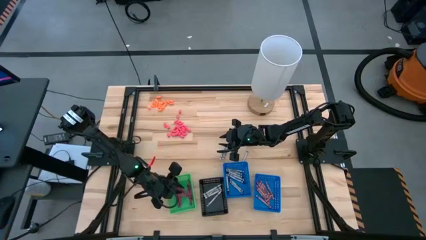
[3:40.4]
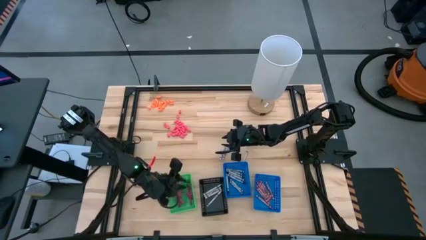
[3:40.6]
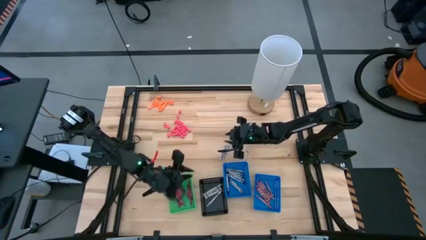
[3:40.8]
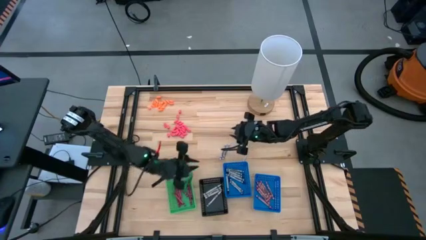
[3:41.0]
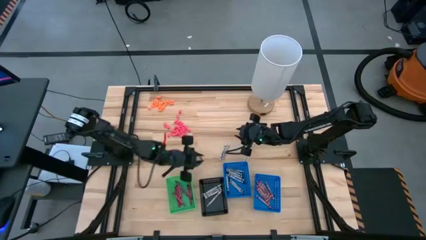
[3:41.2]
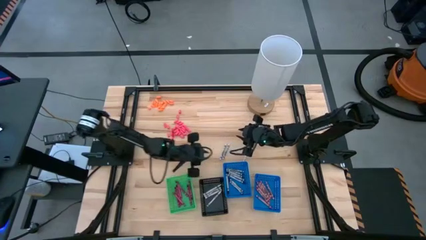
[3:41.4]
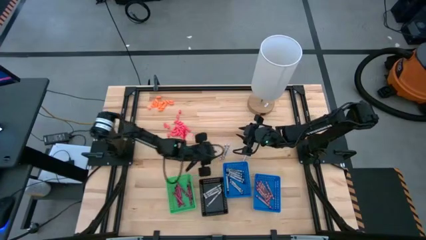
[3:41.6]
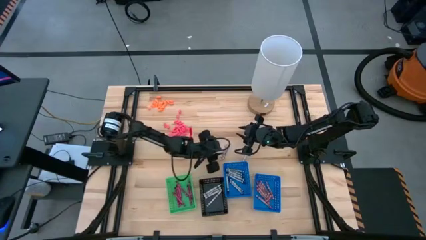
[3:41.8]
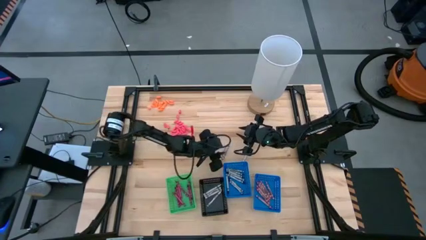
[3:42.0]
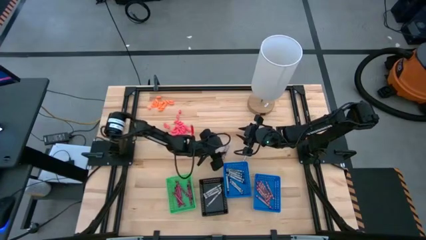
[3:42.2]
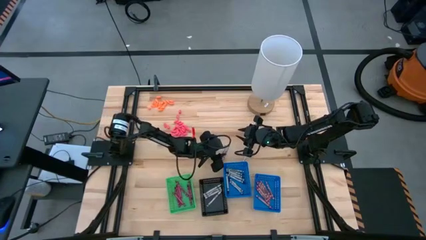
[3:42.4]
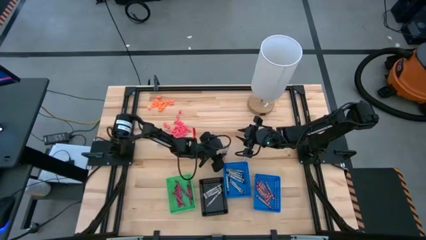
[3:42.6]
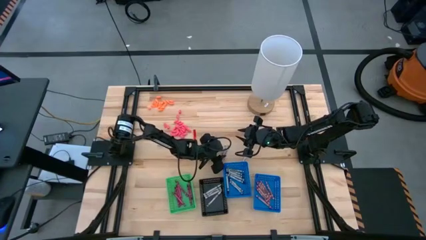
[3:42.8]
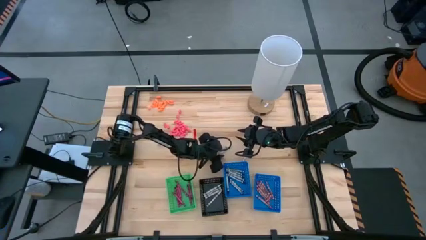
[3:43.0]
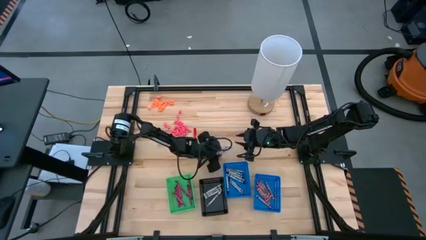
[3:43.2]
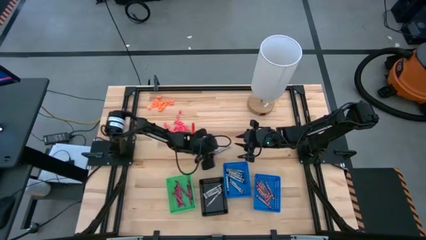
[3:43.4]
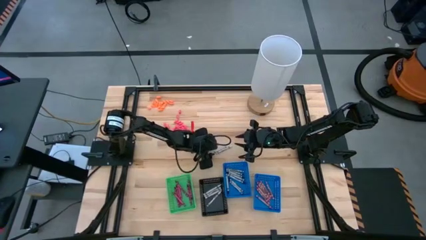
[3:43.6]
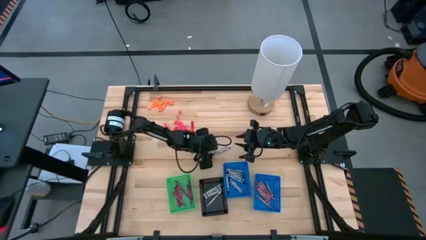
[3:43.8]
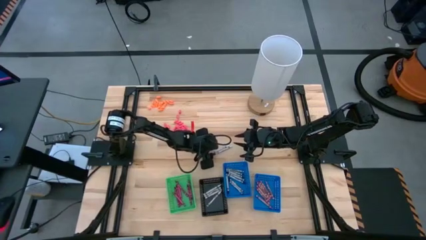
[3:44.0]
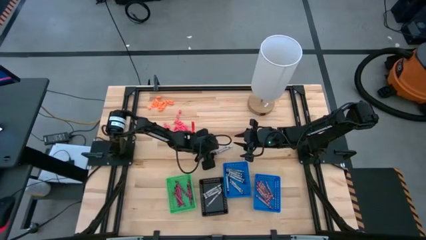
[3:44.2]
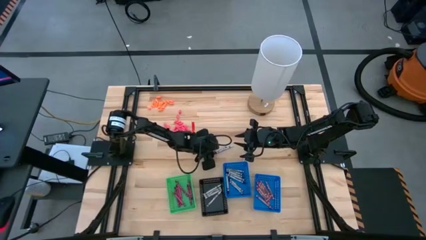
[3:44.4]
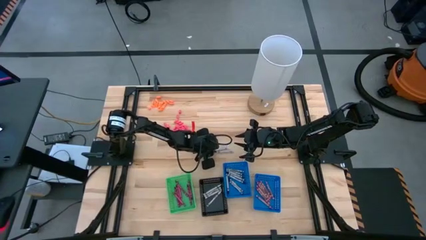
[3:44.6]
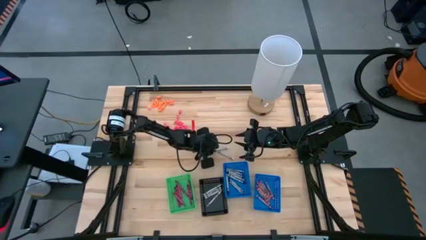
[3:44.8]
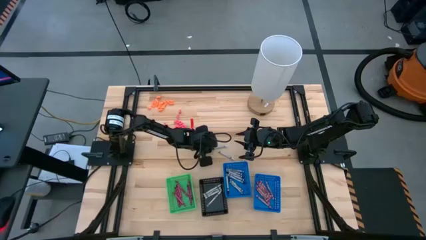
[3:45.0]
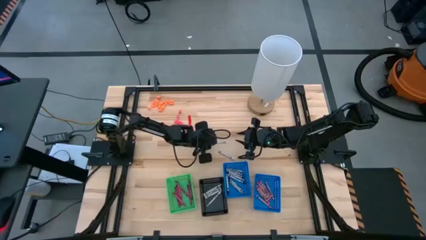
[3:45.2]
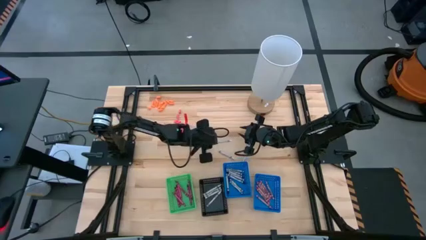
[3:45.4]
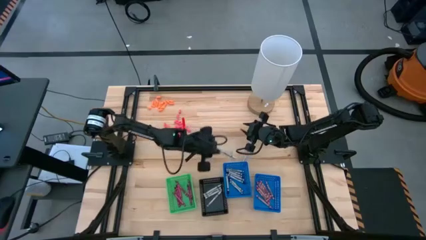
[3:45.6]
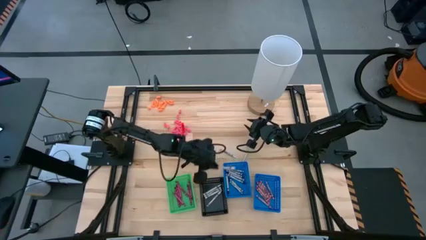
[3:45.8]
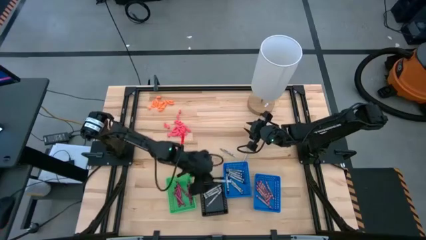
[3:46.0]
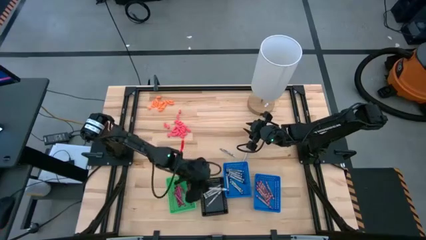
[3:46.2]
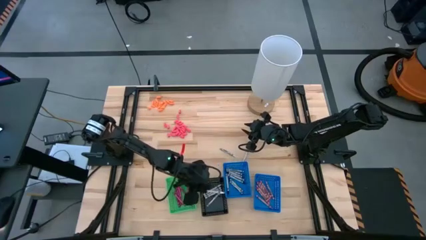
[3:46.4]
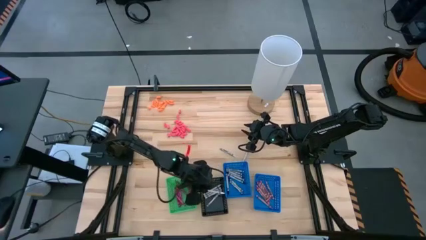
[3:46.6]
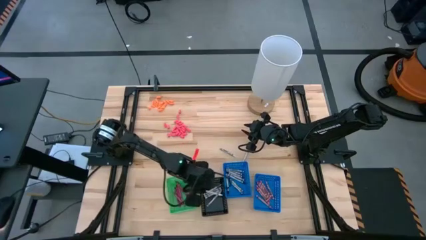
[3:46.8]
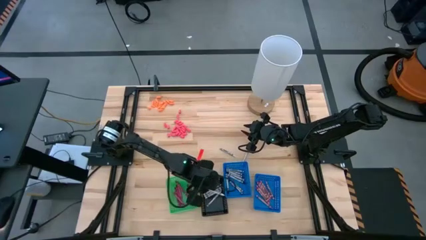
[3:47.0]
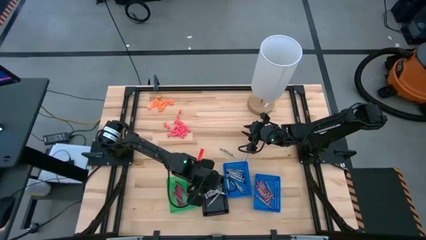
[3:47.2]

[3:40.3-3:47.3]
Task: Sort crayons
Put the white crayon into the black bin

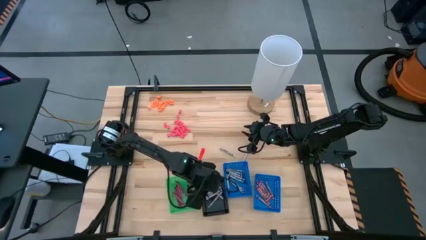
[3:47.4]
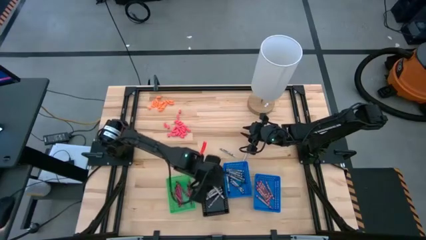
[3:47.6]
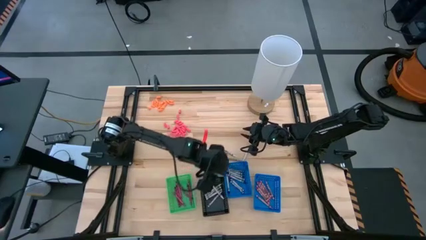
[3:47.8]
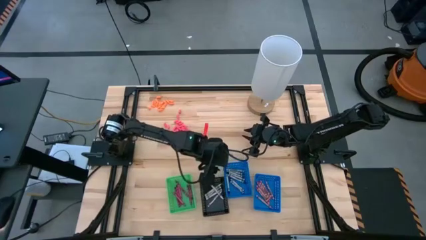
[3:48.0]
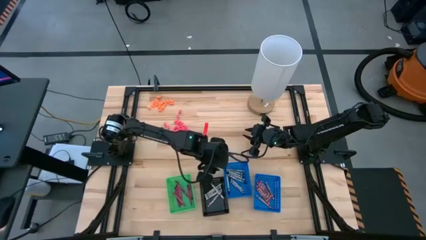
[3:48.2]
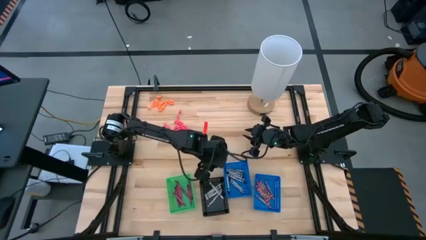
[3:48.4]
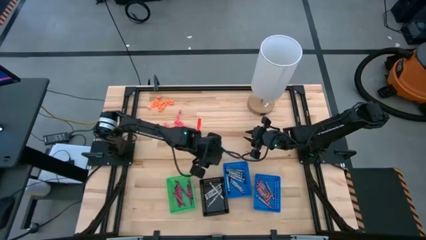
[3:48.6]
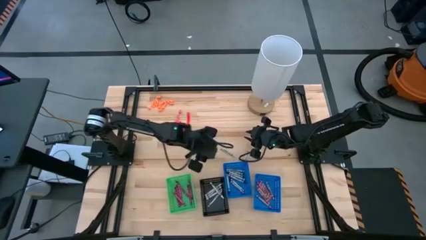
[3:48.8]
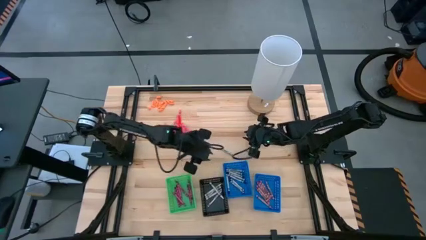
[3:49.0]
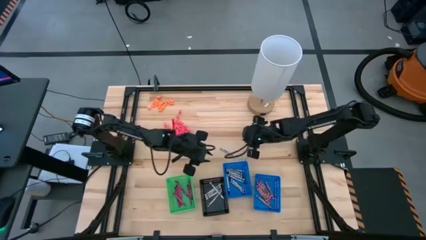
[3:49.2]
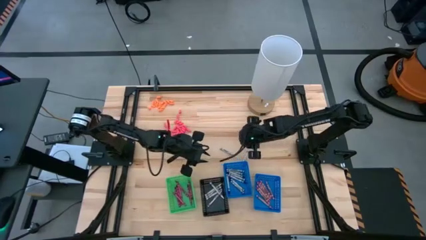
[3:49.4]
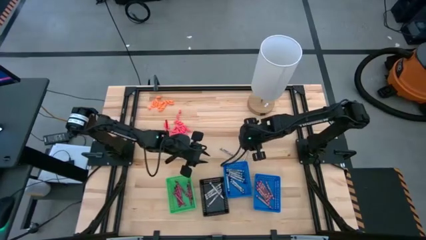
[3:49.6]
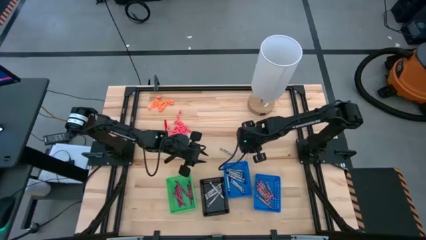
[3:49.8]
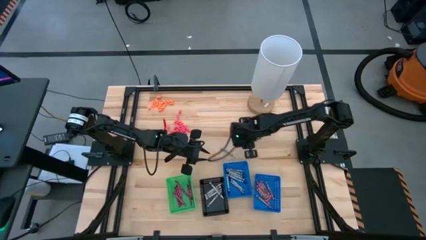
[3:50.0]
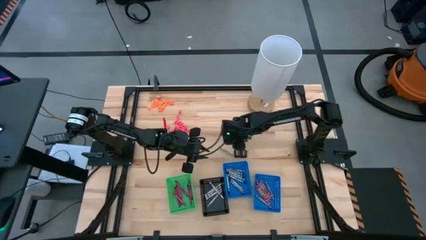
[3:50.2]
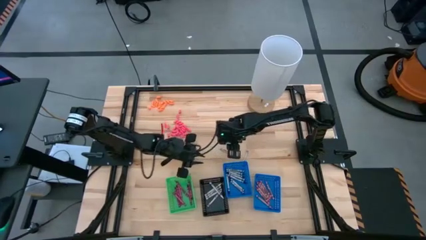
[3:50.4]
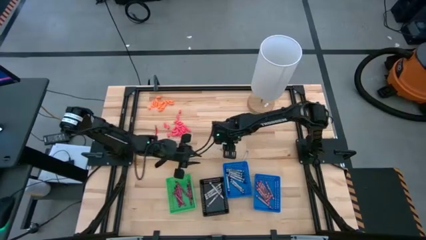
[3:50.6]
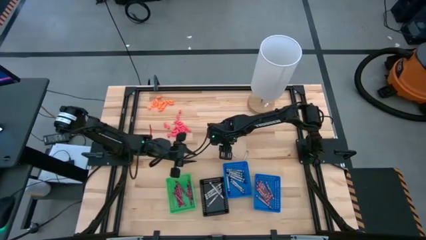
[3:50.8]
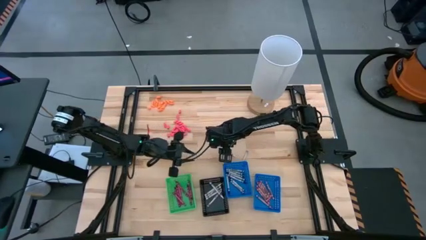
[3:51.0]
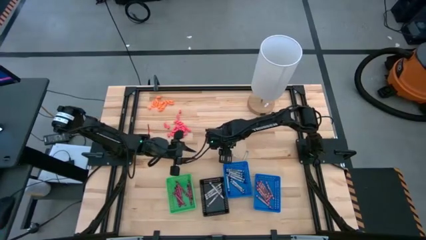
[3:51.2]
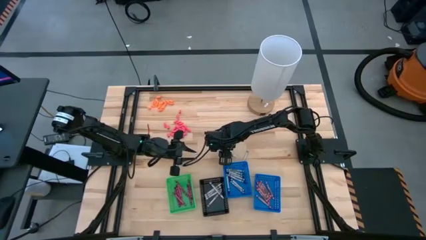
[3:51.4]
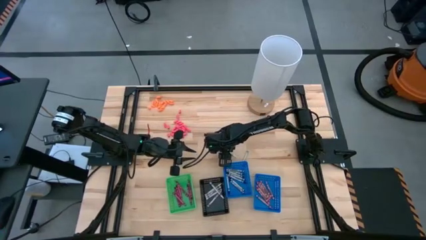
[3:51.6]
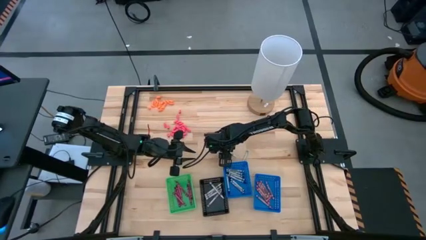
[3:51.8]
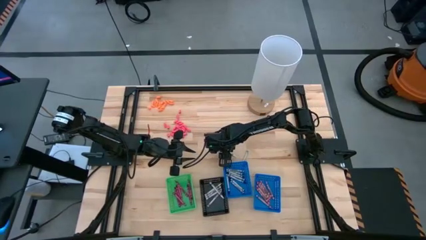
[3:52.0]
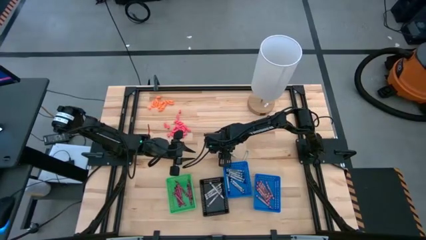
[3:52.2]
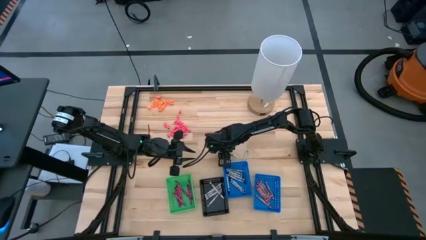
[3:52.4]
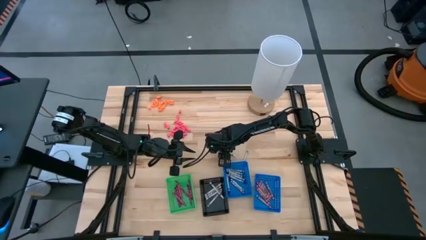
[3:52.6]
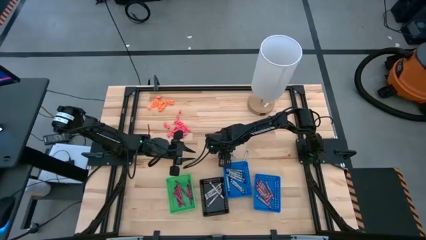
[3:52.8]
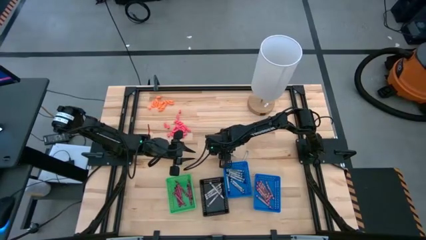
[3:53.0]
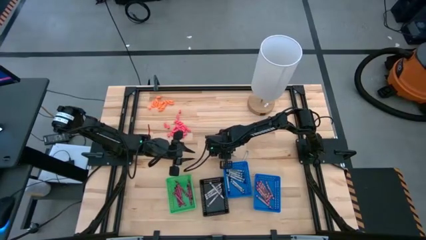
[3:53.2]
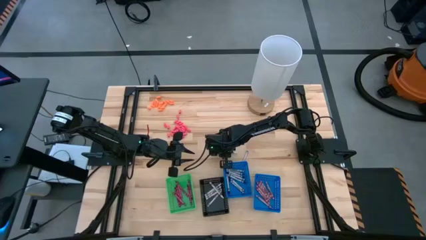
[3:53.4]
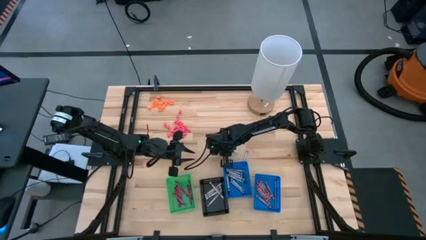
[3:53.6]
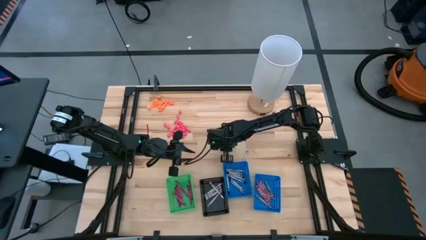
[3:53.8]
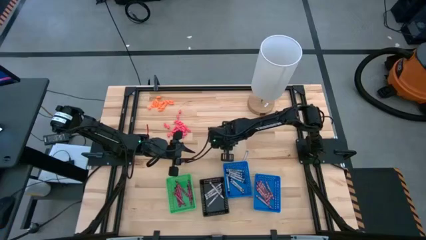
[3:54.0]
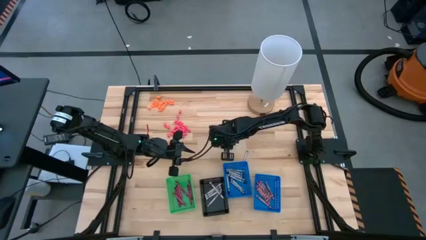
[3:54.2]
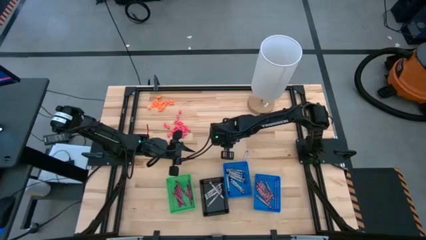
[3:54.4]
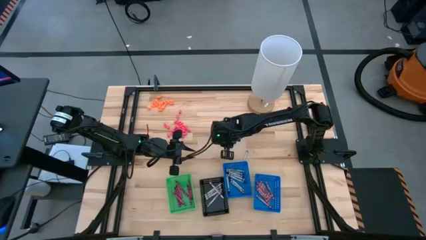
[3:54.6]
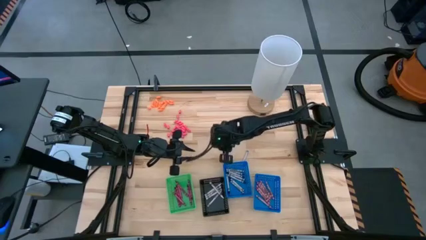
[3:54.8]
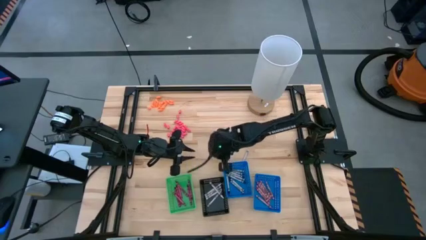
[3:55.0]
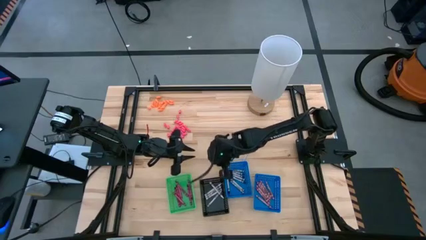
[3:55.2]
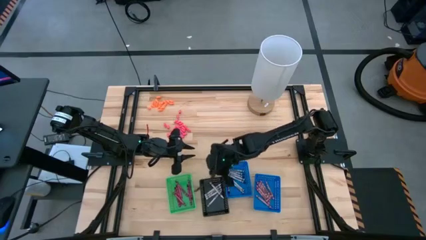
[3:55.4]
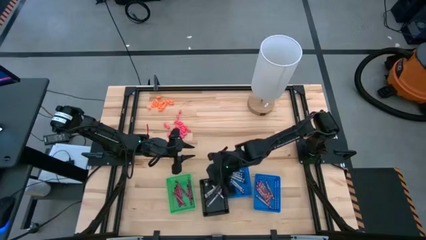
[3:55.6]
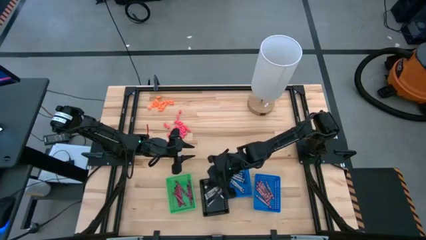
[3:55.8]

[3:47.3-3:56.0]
Put the white crayon into the black bin
